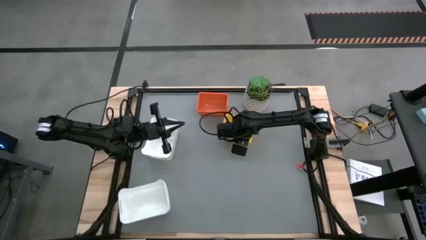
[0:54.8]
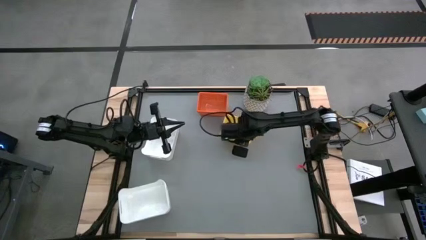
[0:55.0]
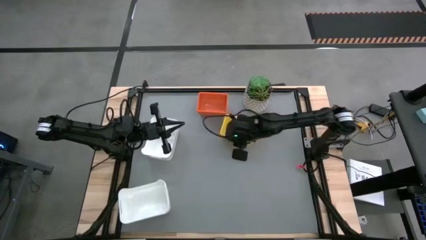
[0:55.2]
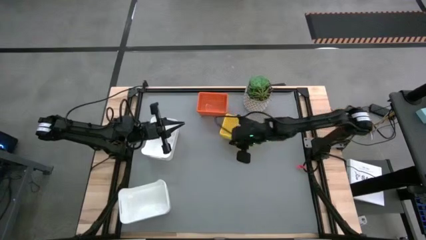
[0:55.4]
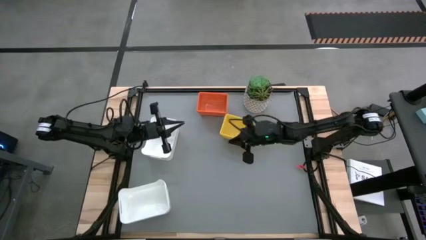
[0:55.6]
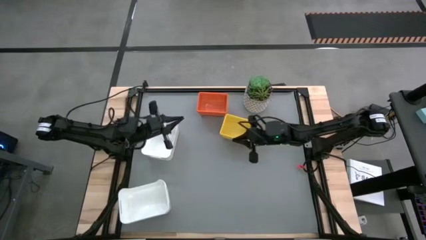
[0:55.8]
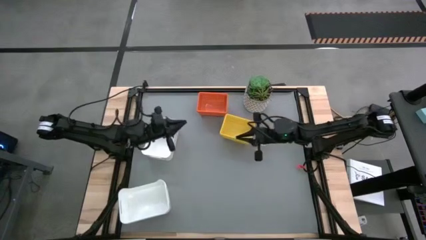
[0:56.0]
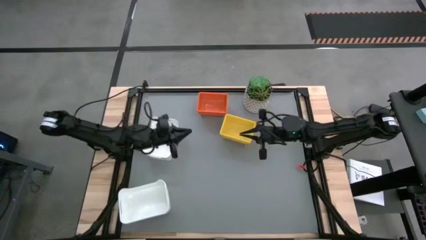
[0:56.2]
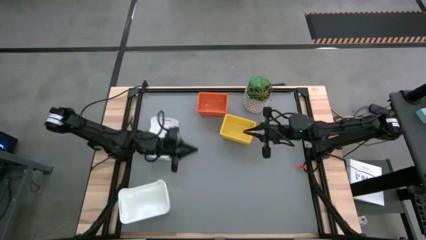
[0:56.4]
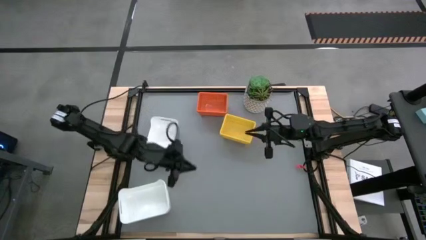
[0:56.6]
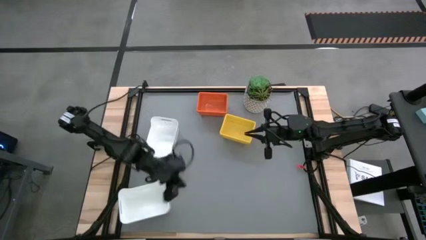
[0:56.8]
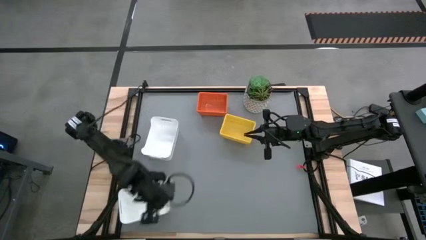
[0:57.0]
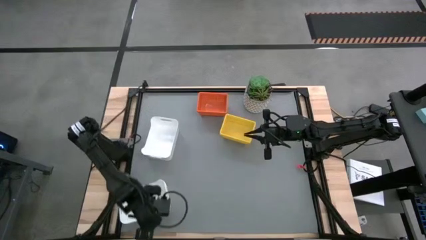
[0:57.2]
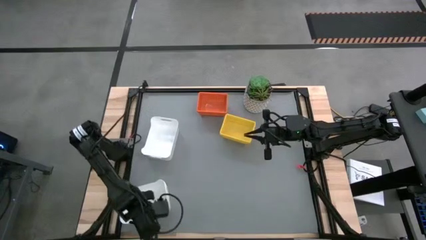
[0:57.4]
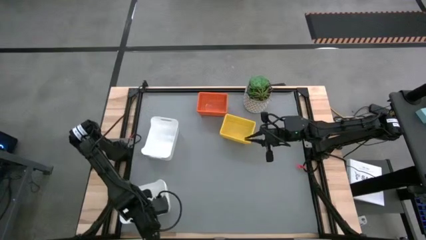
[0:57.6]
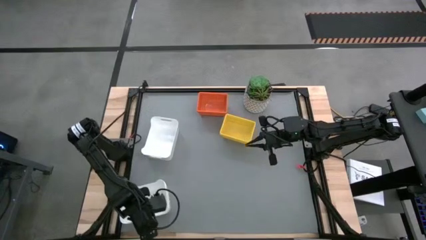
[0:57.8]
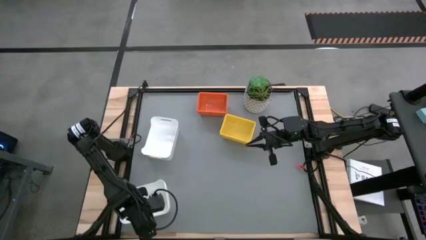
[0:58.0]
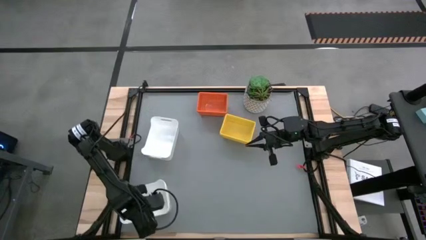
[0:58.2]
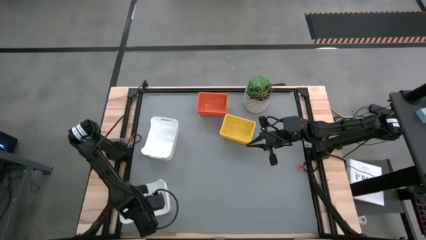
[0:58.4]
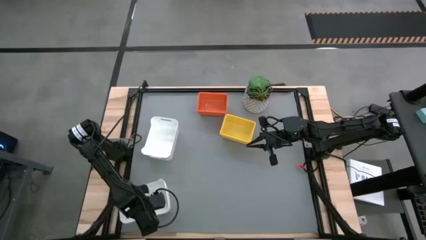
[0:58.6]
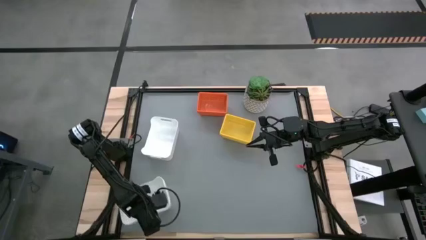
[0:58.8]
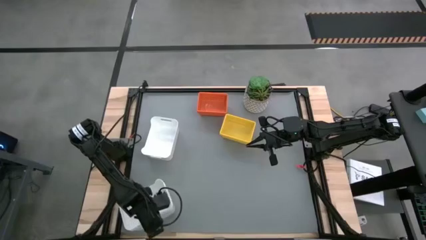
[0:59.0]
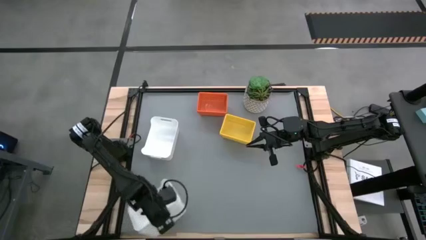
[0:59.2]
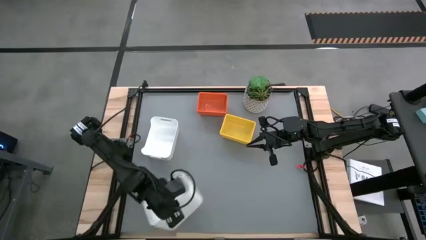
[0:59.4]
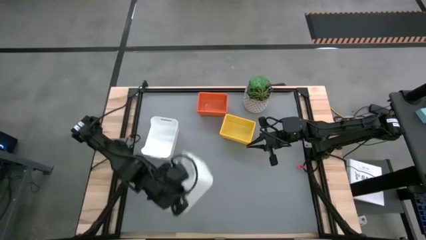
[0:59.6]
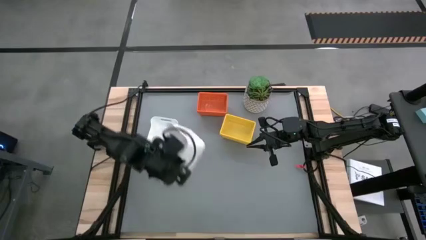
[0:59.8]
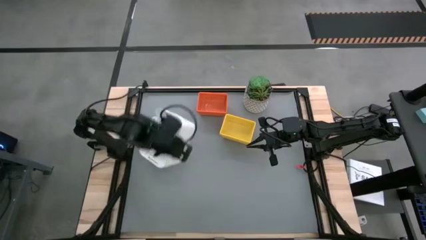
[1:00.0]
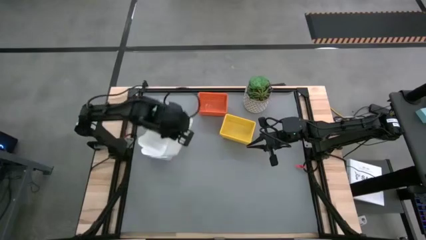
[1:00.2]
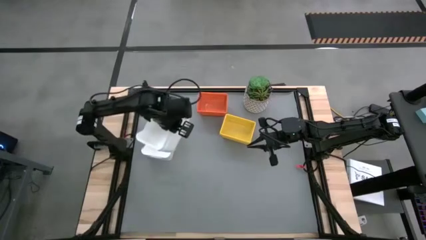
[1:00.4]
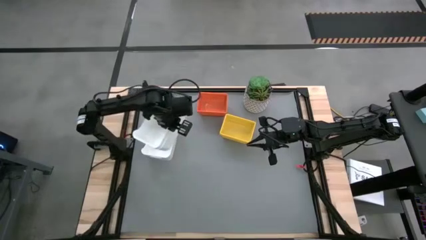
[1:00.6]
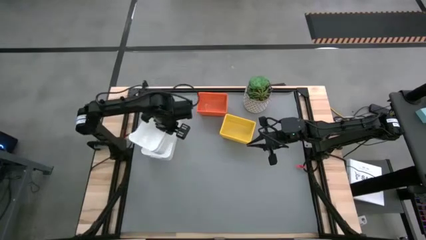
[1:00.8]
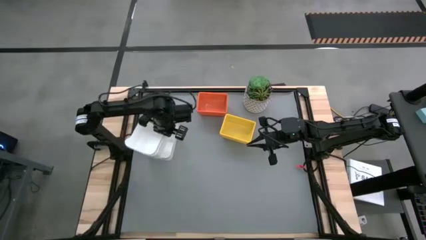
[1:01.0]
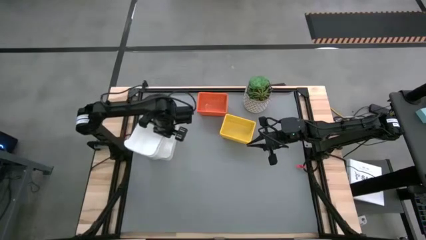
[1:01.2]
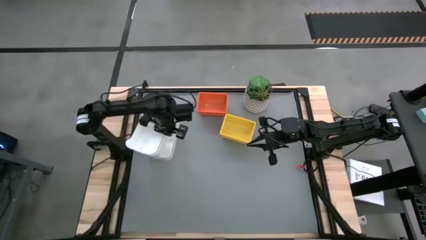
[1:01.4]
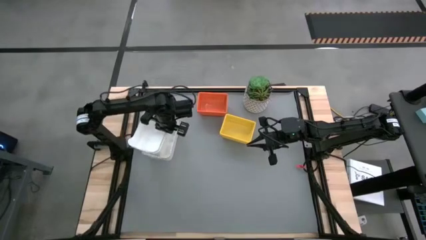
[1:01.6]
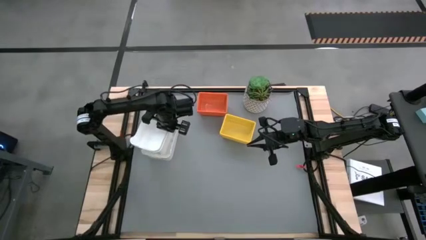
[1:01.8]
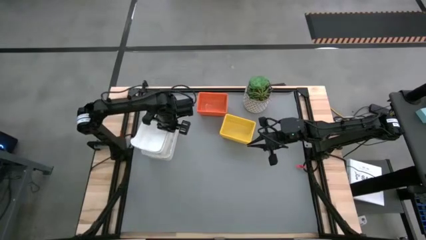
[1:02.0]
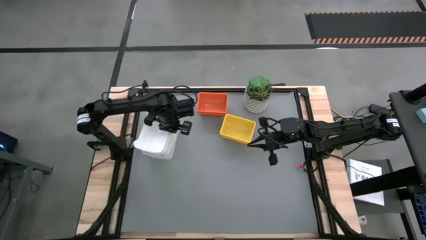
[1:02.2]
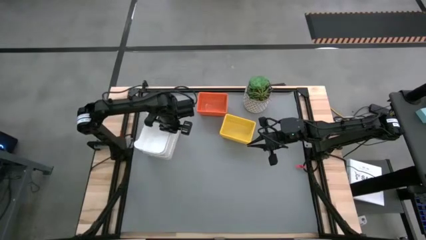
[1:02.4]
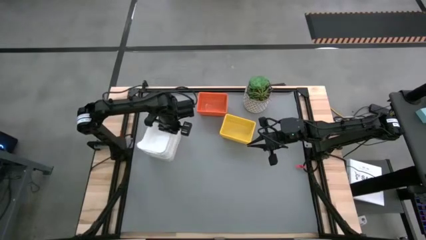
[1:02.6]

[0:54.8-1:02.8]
Stack the bottom stacked white bins on top of the white bin

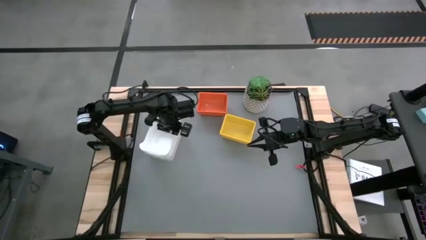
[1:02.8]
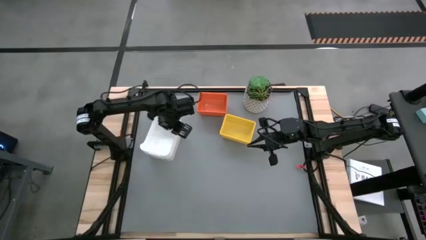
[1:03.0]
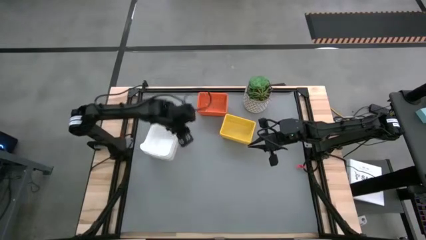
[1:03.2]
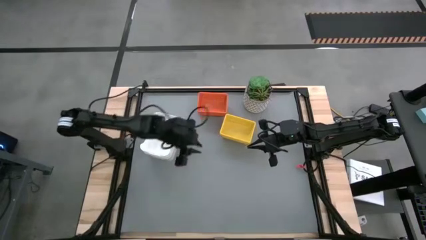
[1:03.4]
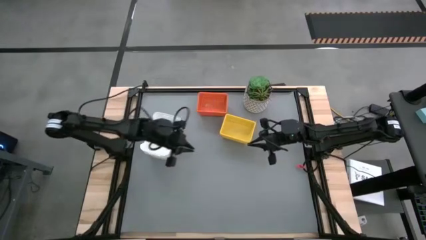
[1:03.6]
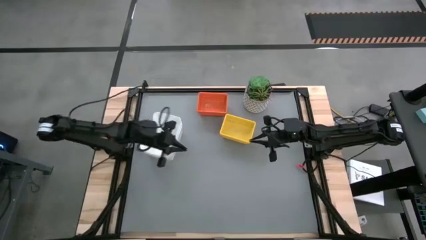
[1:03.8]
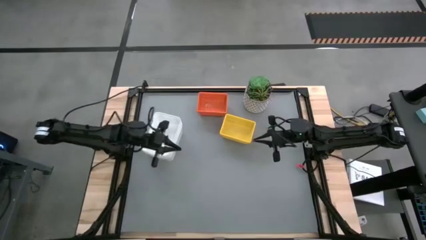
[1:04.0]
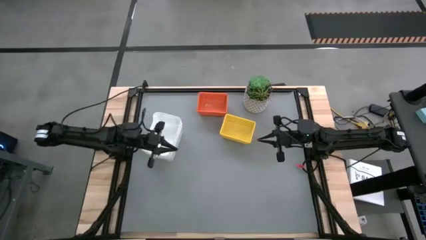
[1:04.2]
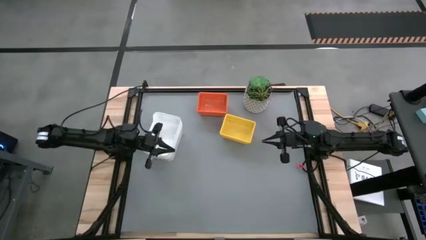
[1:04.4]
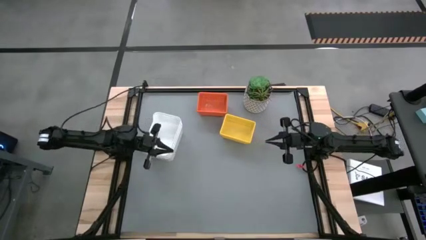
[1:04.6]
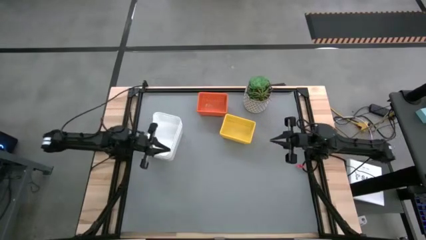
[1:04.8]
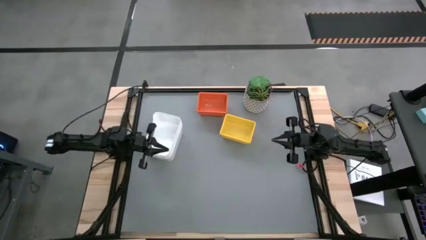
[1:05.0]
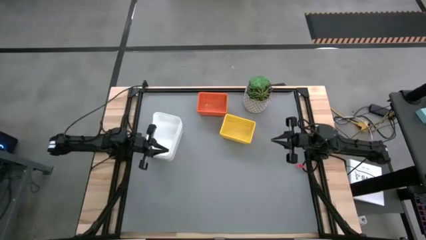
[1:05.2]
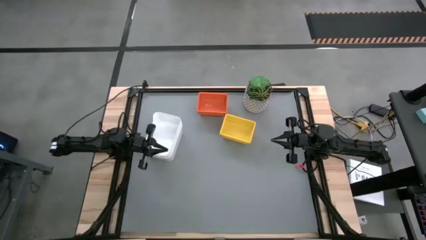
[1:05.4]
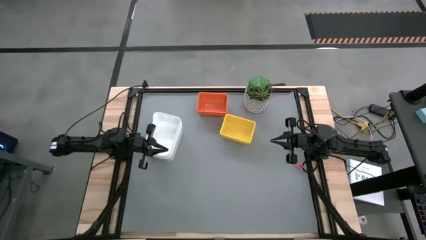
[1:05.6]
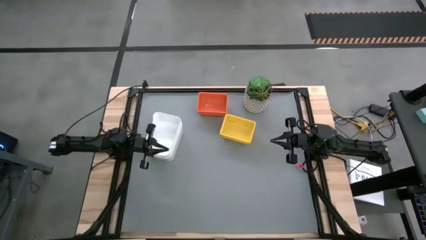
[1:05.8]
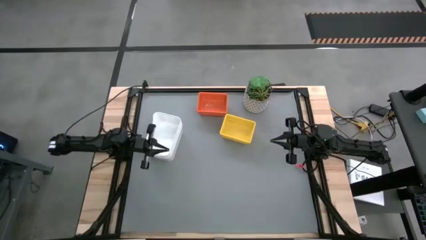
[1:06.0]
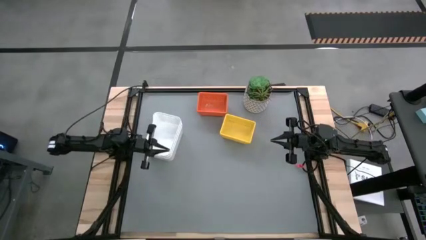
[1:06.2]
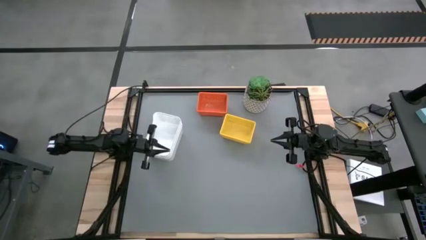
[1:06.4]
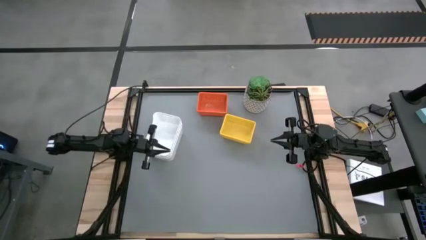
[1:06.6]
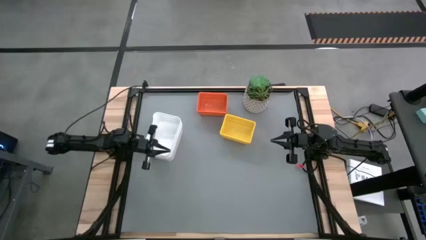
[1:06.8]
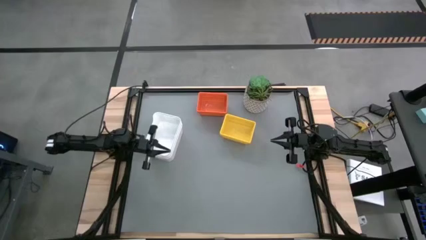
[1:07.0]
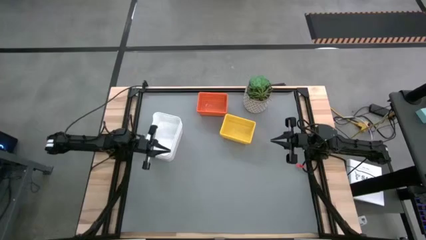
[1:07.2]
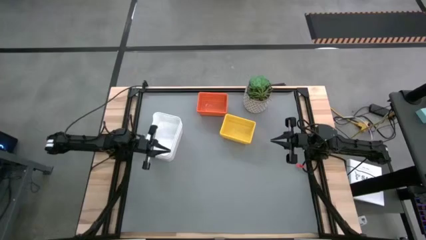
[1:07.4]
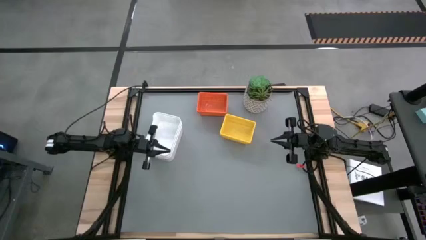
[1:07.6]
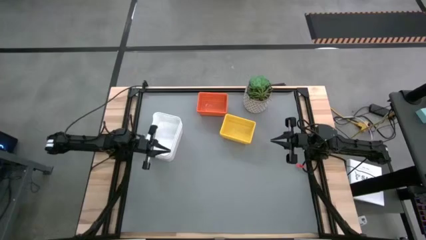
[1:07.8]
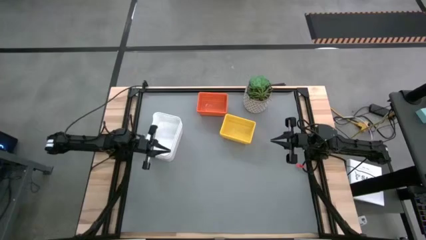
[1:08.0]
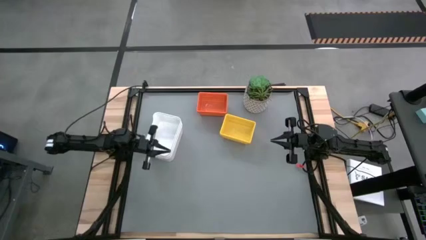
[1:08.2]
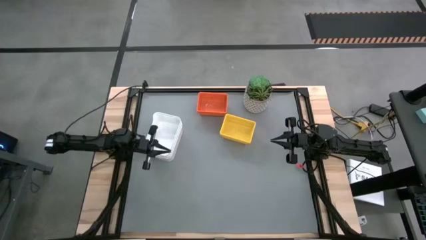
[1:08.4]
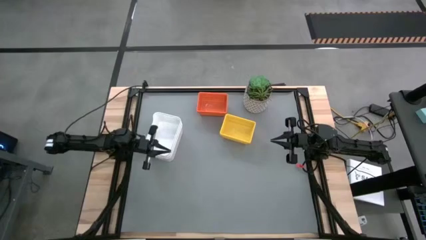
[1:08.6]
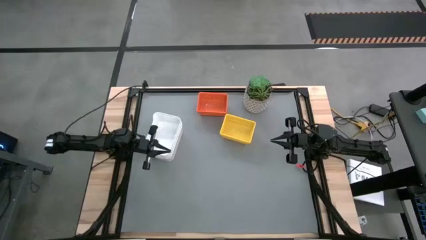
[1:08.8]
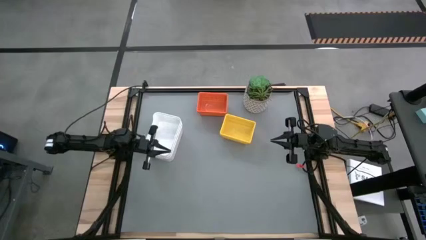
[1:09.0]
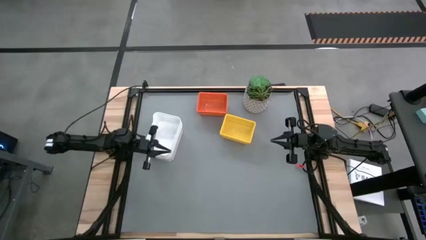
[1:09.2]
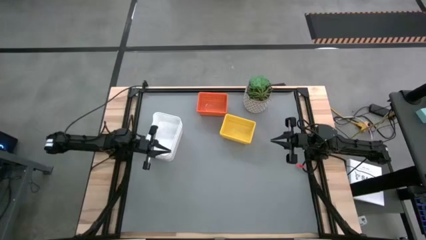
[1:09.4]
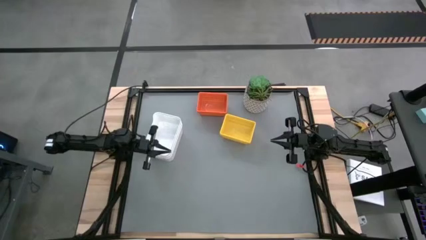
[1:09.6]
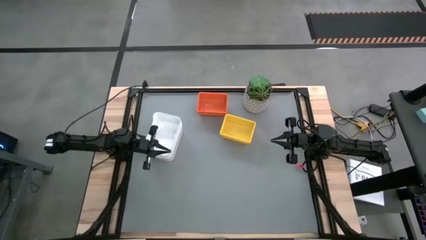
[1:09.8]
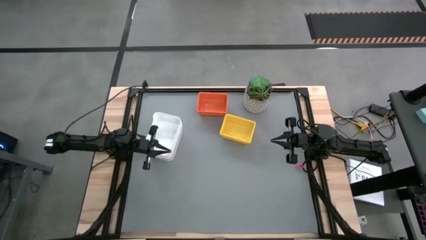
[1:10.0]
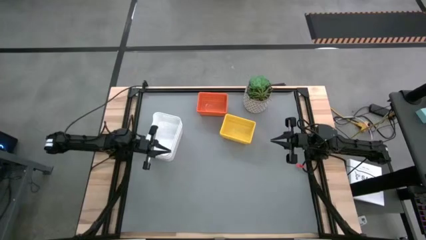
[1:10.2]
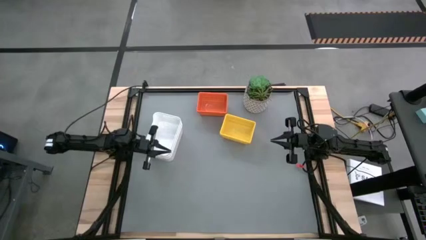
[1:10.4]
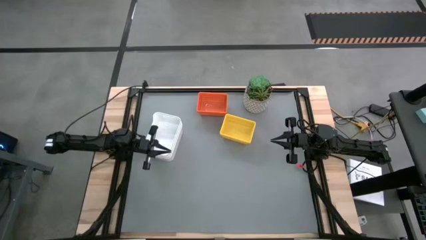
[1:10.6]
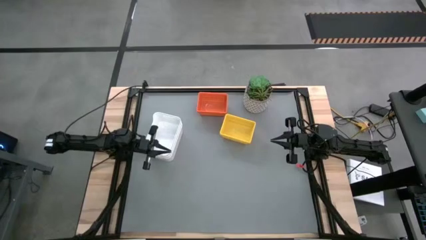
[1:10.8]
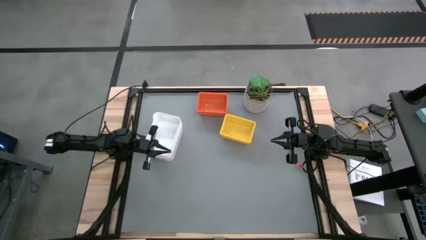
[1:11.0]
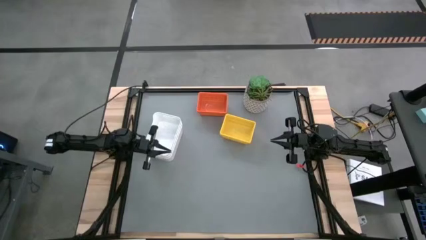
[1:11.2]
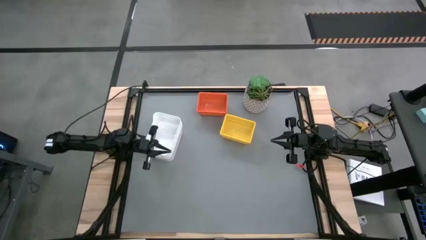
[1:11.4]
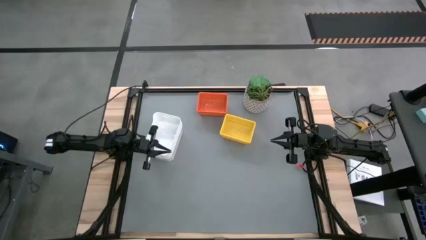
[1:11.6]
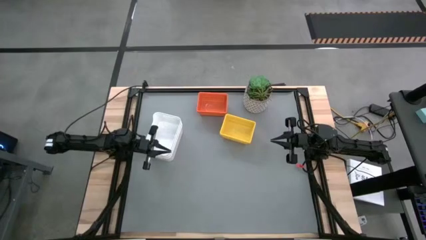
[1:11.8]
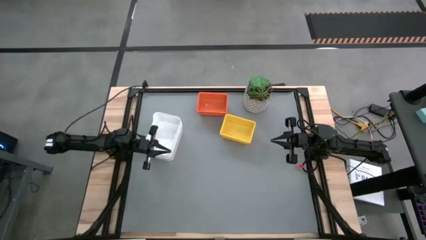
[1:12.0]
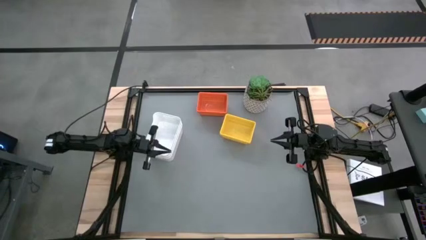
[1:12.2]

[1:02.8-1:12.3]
Return to Home Position
